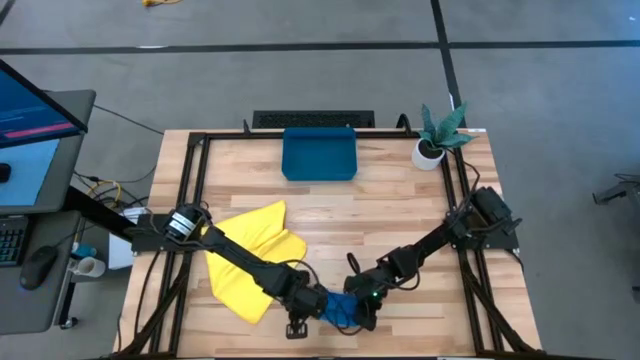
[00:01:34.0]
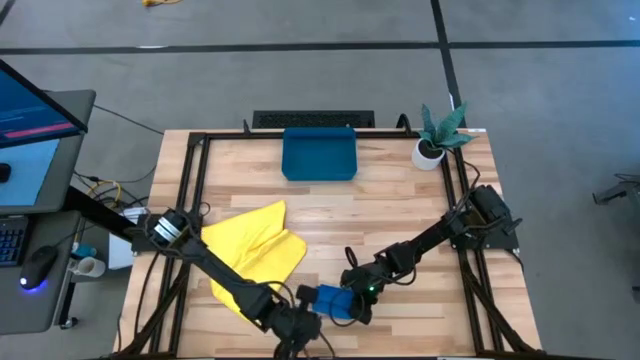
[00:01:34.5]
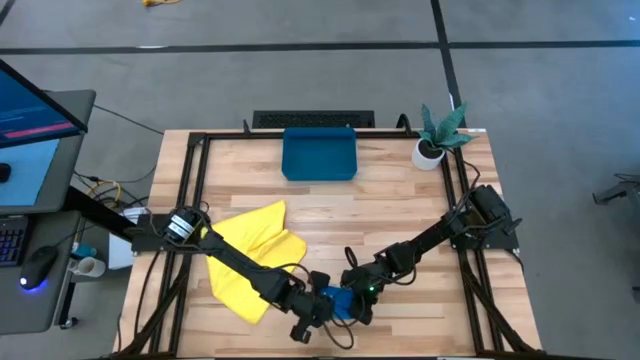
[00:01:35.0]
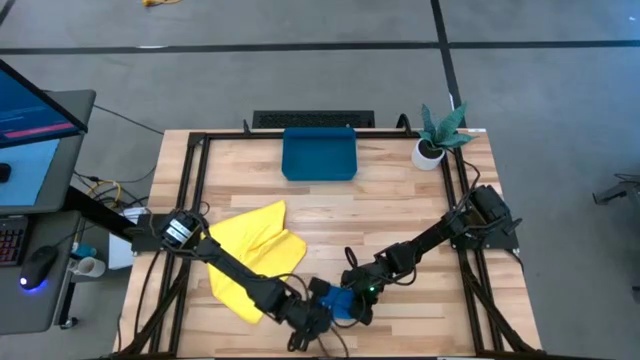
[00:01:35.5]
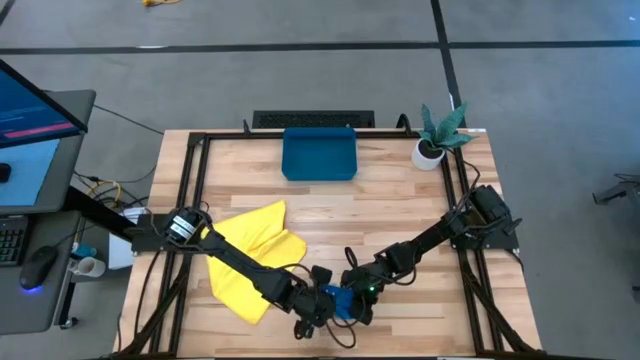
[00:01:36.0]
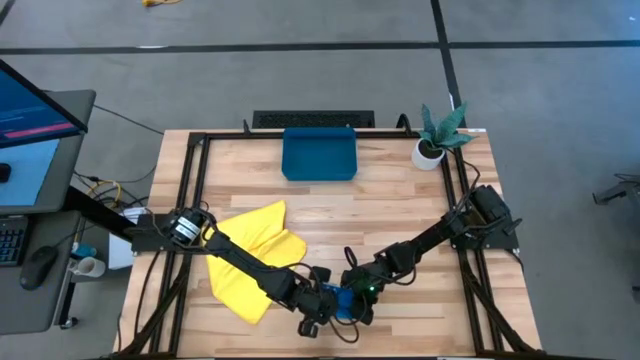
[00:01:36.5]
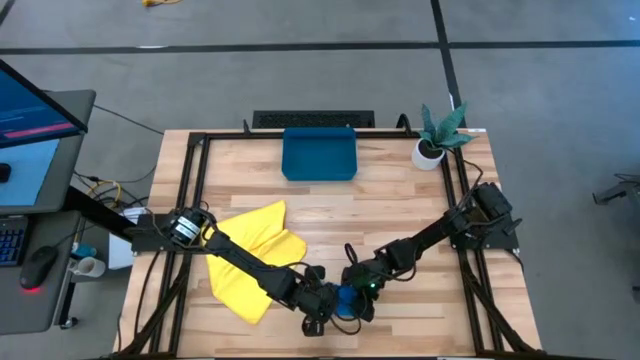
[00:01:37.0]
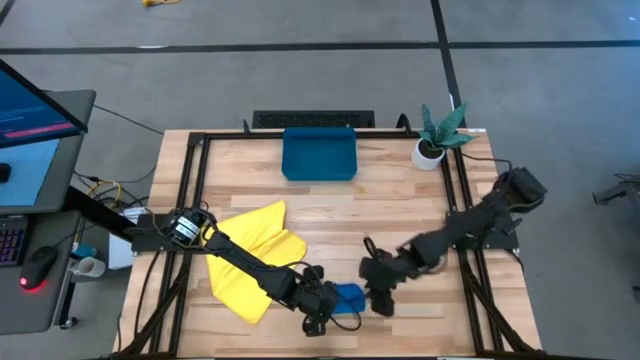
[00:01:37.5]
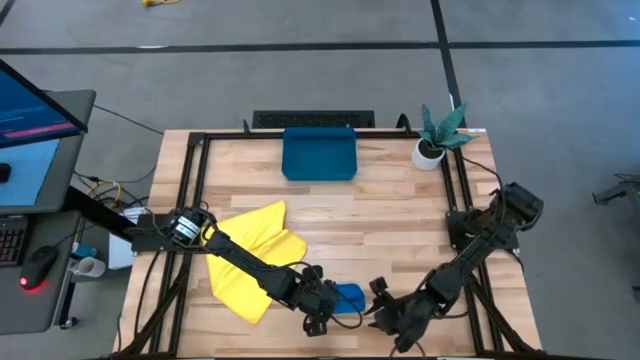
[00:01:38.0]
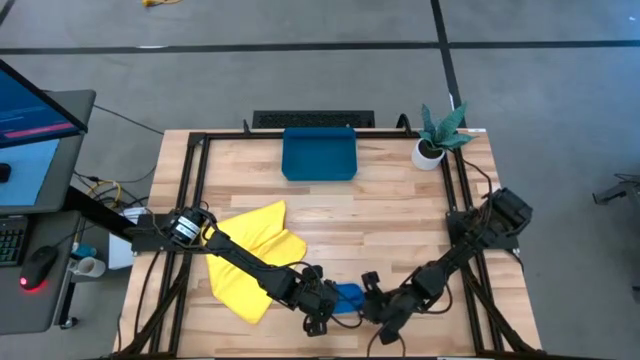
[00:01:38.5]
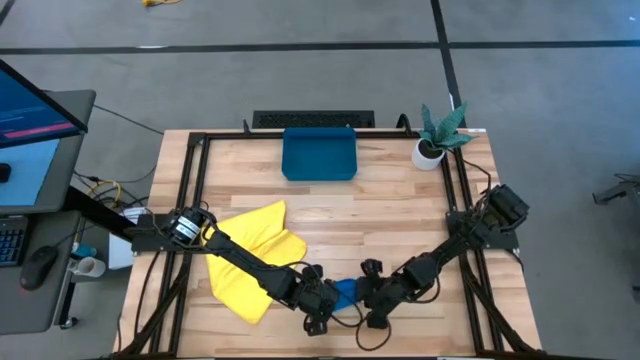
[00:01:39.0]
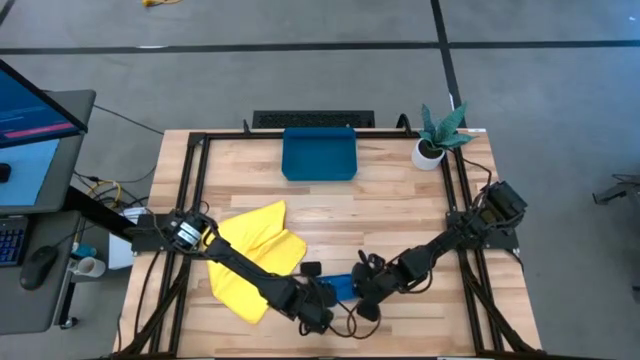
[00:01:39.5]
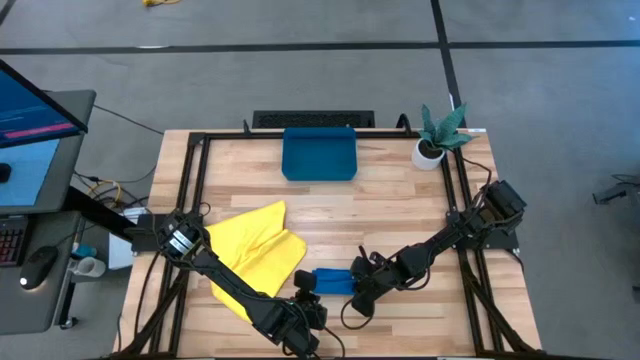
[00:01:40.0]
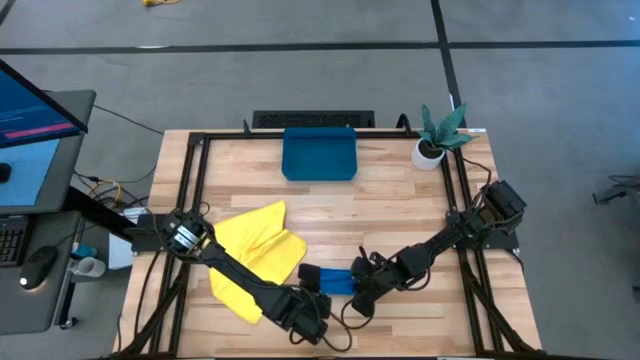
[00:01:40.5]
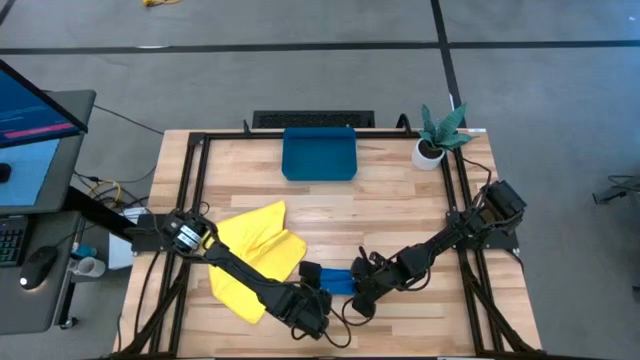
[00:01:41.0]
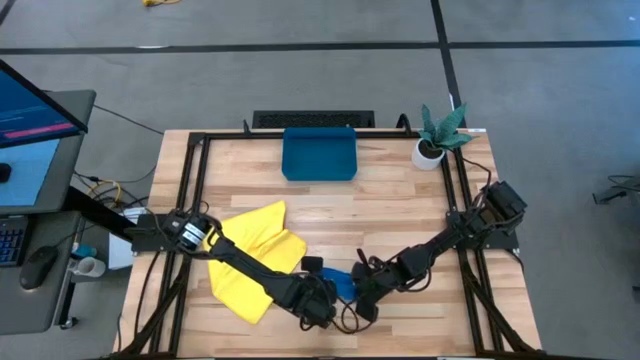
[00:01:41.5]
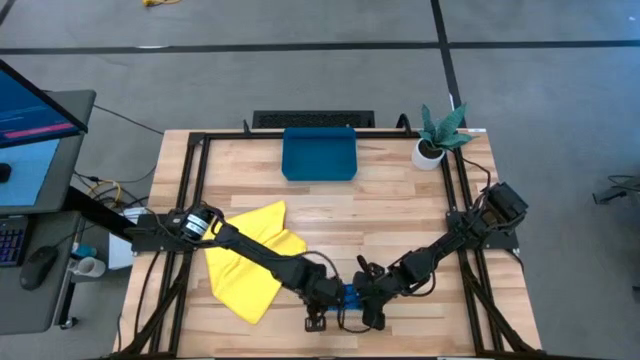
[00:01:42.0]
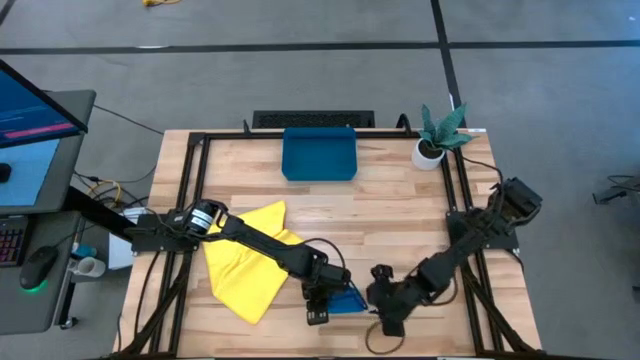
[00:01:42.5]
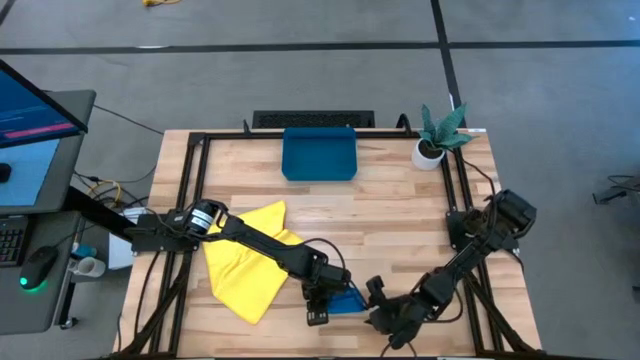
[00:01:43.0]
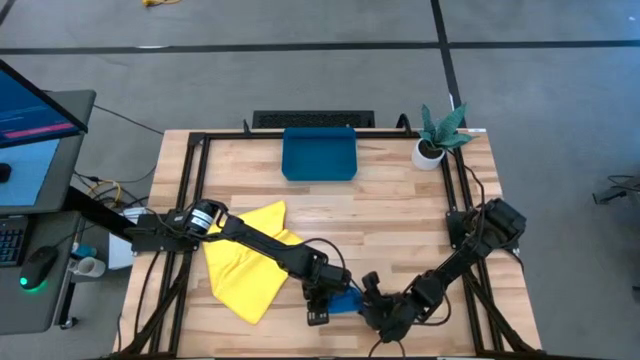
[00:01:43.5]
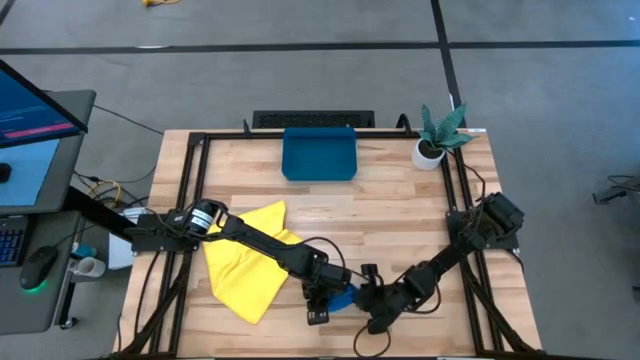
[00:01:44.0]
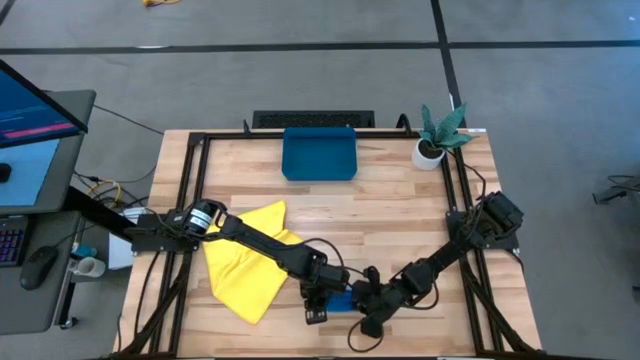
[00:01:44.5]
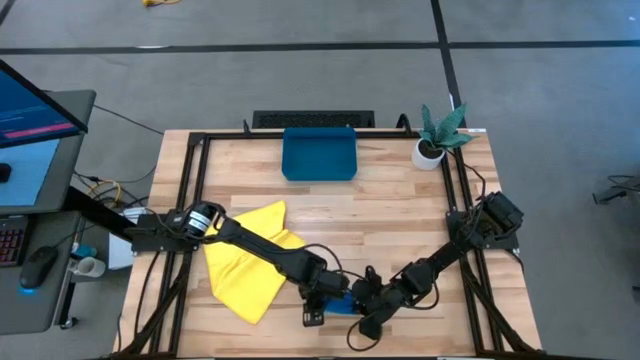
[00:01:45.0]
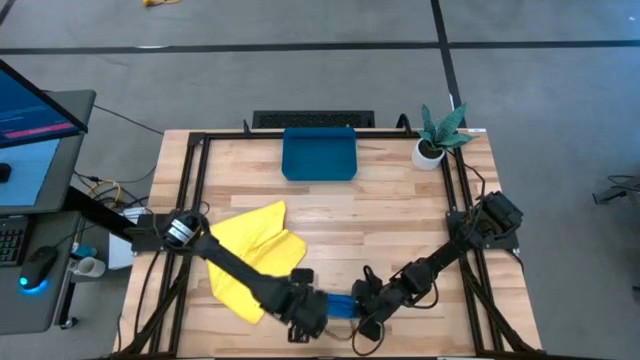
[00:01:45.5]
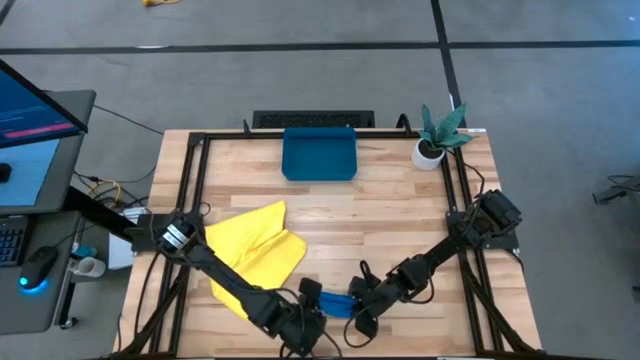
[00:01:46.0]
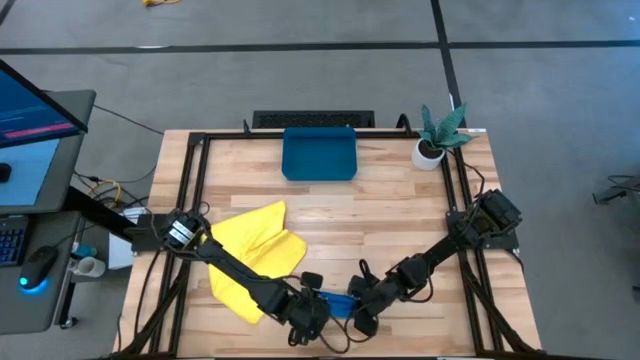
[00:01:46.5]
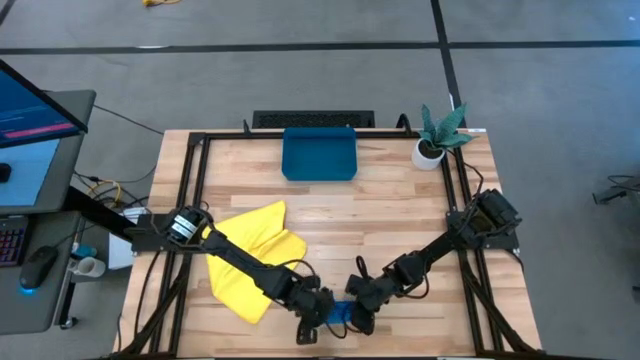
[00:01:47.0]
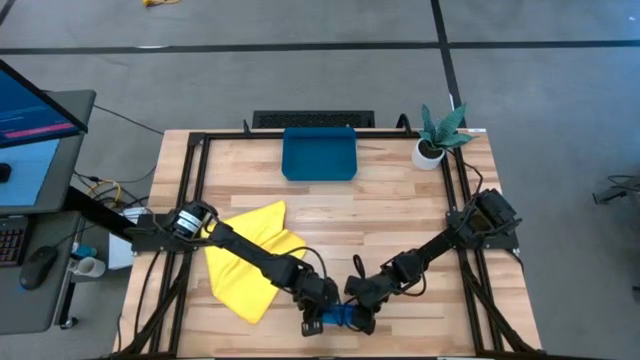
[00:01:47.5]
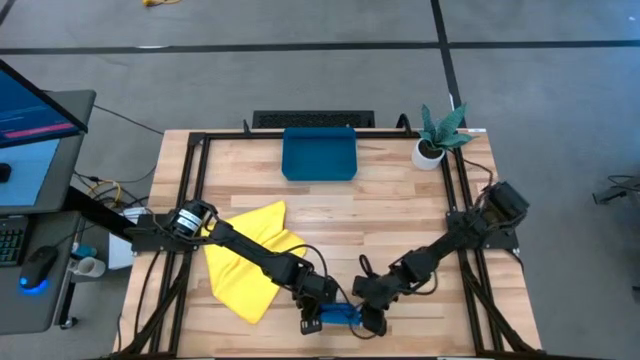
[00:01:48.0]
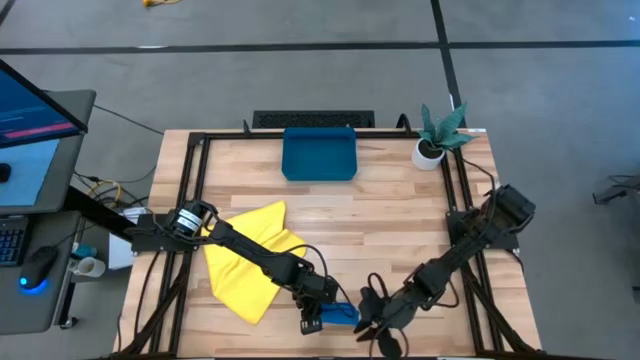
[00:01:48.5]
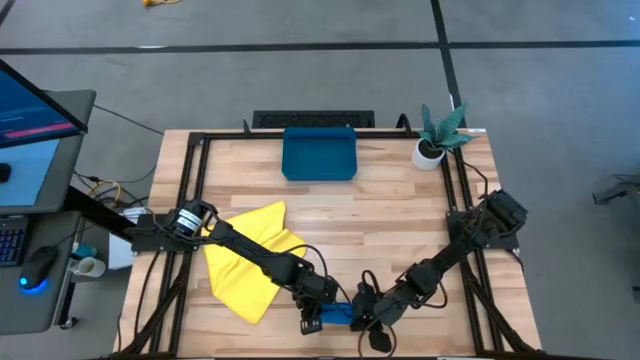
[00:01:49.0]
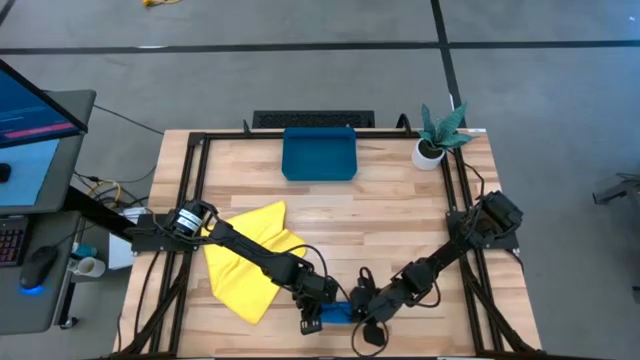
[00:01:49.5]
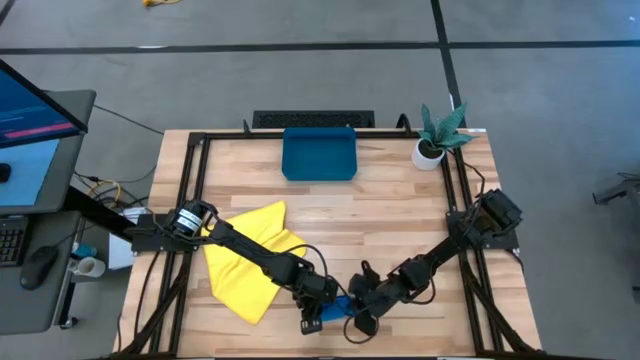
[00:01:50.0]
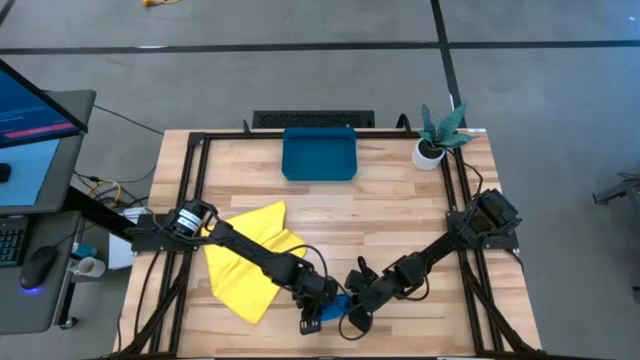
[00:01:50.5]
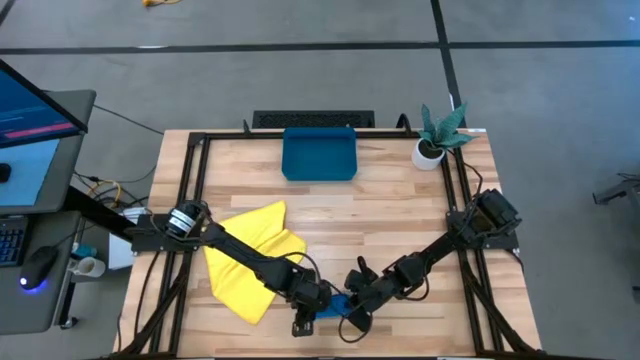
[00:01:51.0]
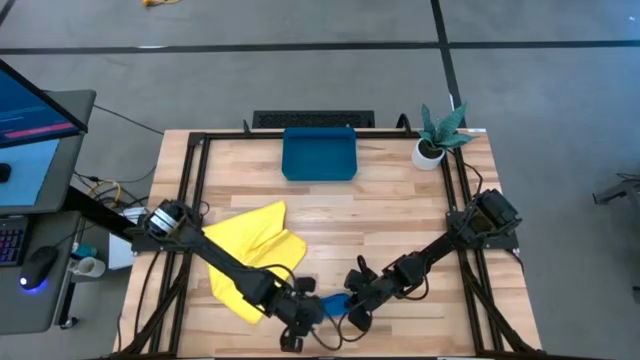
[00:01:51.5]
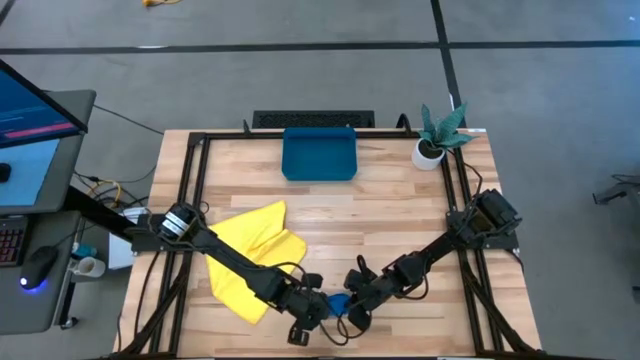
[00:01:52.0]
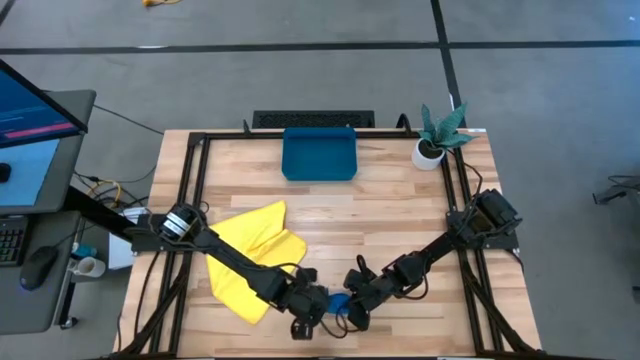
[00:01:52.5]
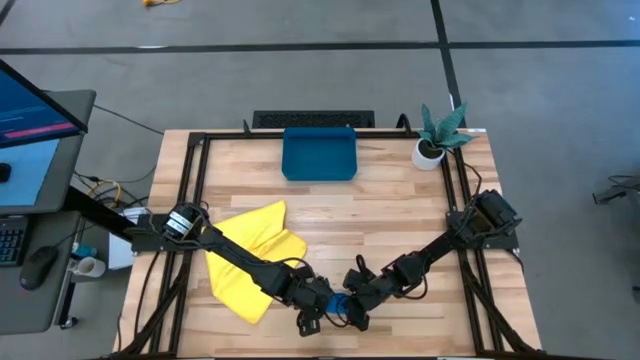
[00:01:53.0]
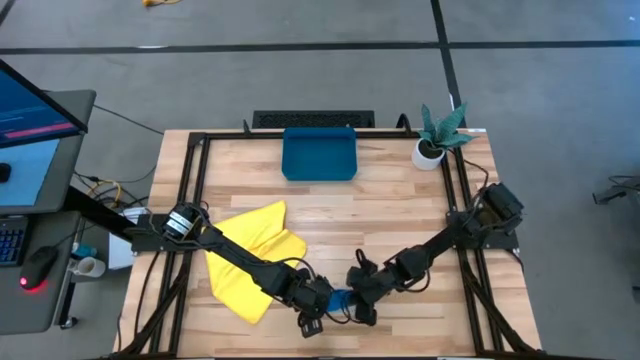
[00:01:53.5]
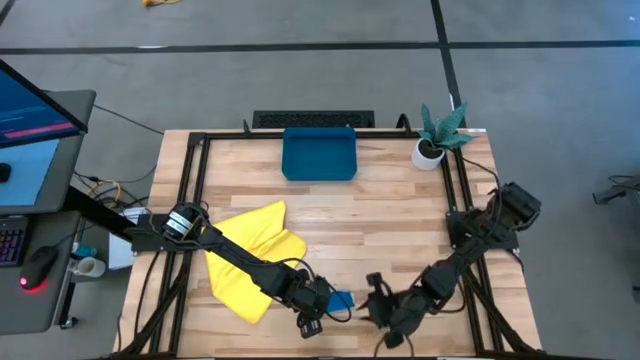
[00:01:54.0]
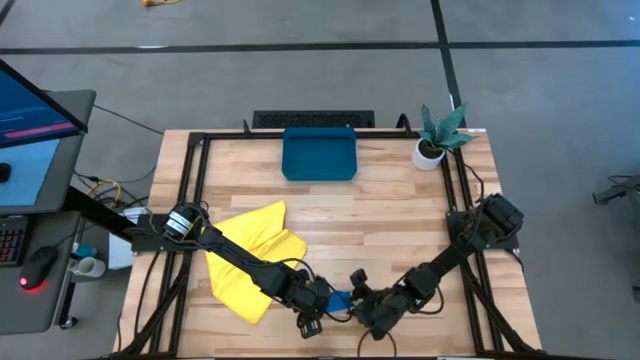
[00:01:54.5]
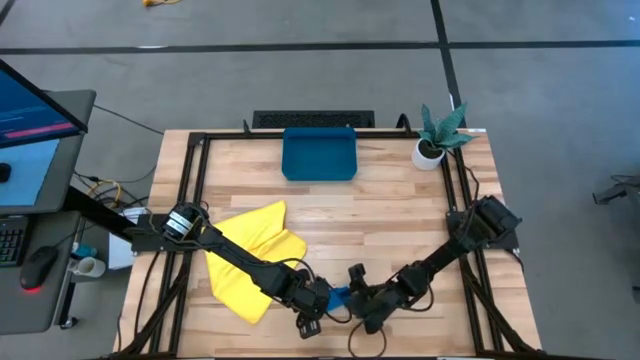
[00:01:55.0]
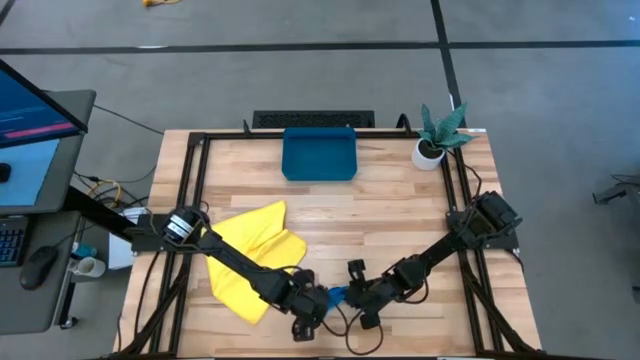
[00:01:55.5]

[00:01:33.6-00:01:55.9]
Task: Roll microfiber towels into tight, uniform cylinder then place into a basket
Roll the blue microfiber cloth
